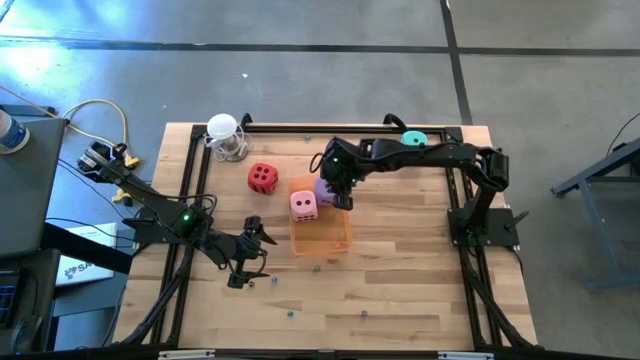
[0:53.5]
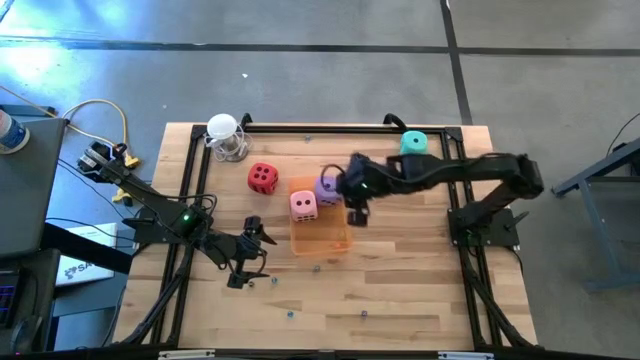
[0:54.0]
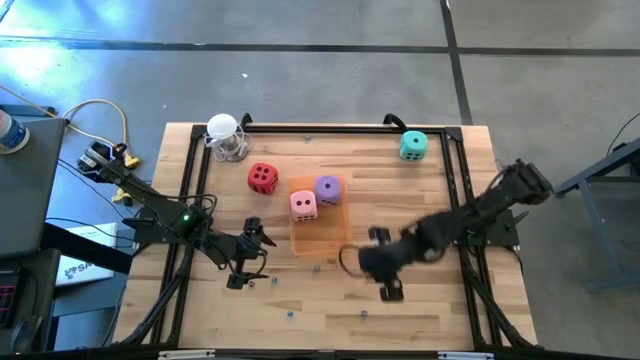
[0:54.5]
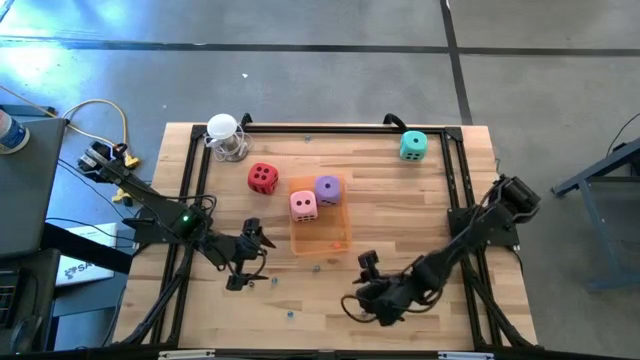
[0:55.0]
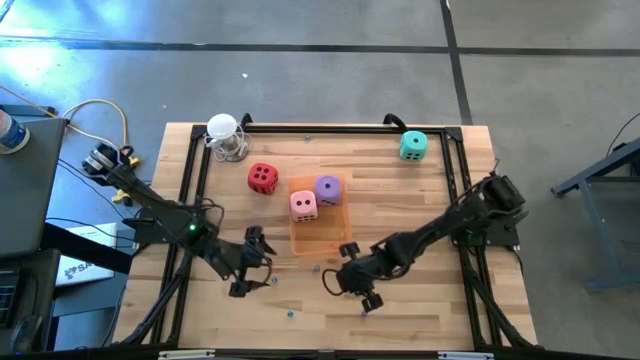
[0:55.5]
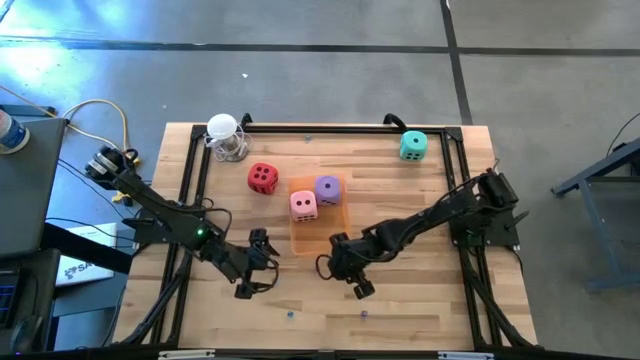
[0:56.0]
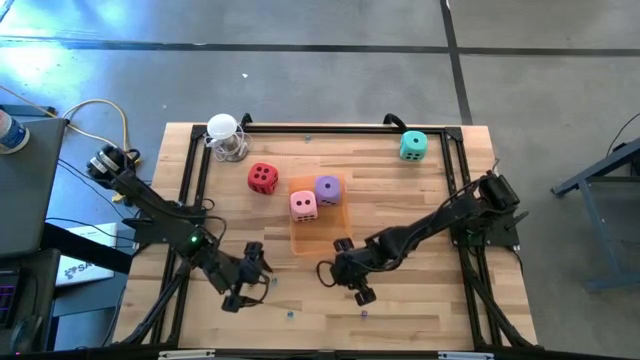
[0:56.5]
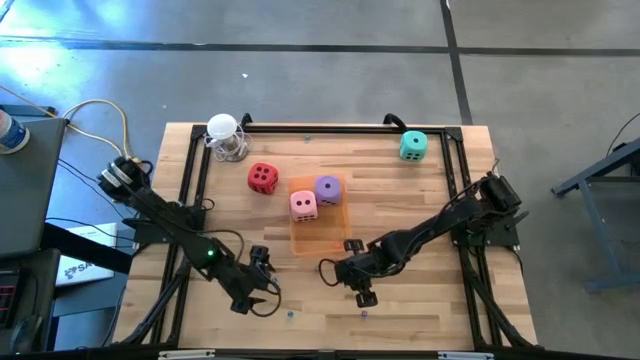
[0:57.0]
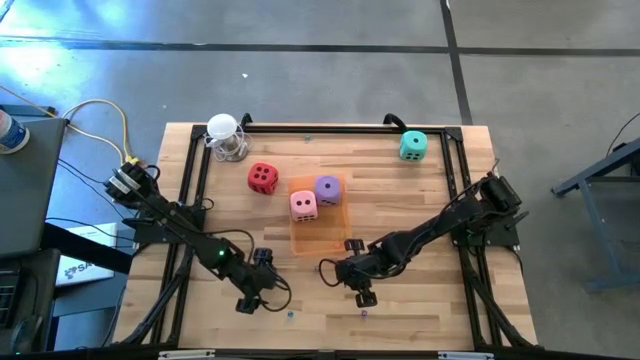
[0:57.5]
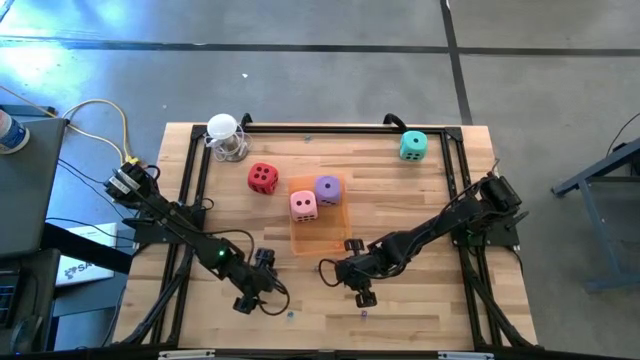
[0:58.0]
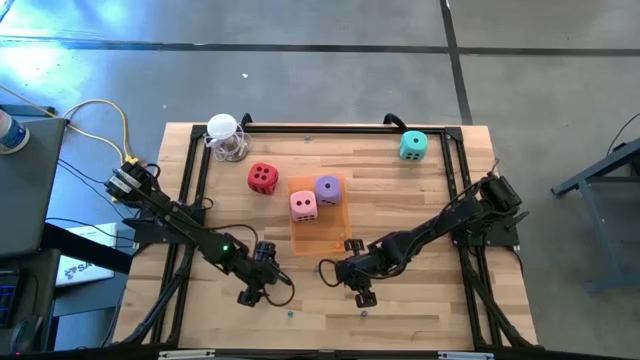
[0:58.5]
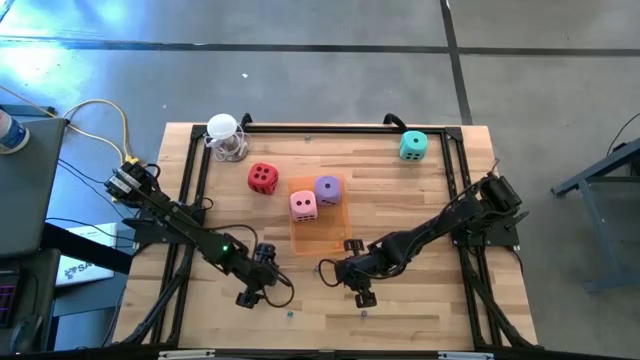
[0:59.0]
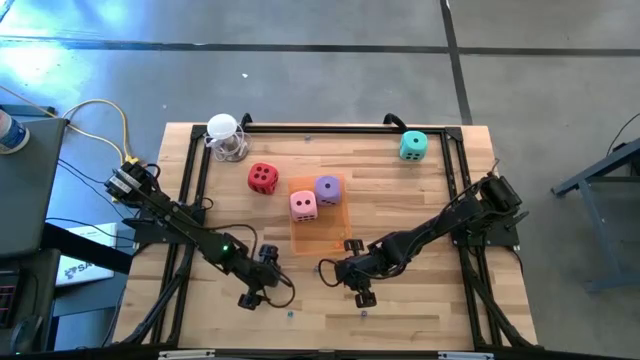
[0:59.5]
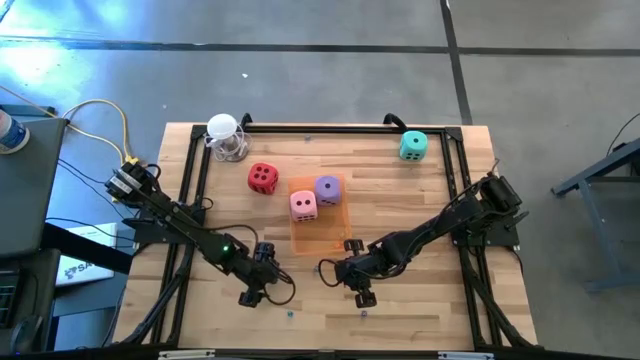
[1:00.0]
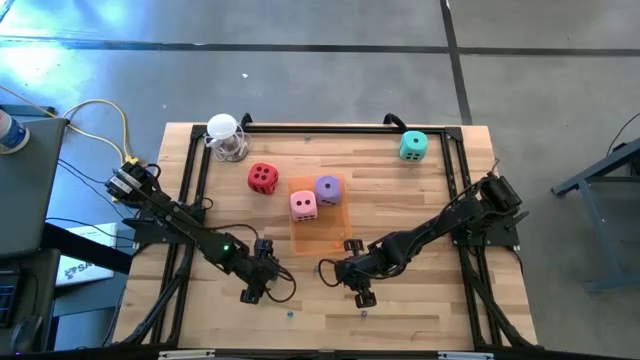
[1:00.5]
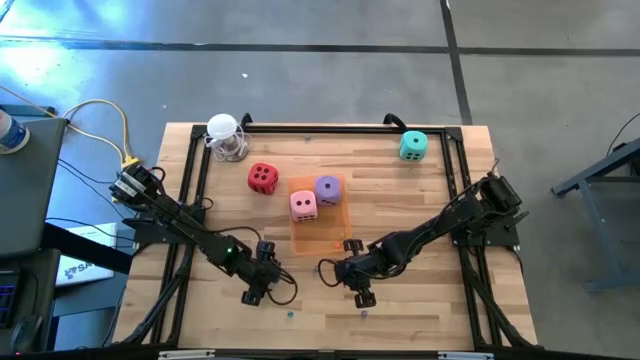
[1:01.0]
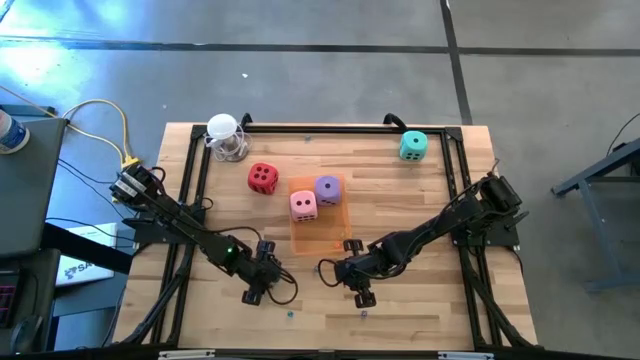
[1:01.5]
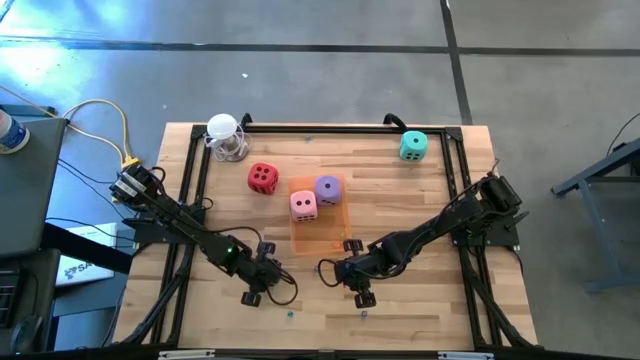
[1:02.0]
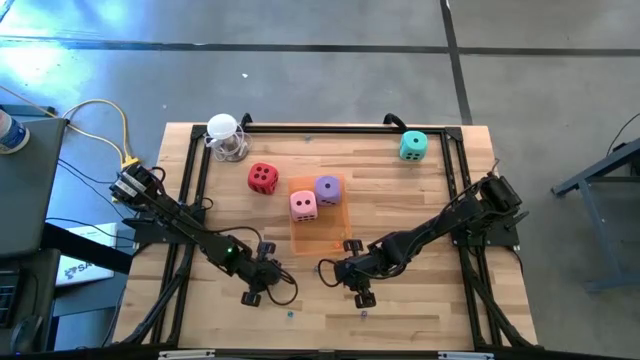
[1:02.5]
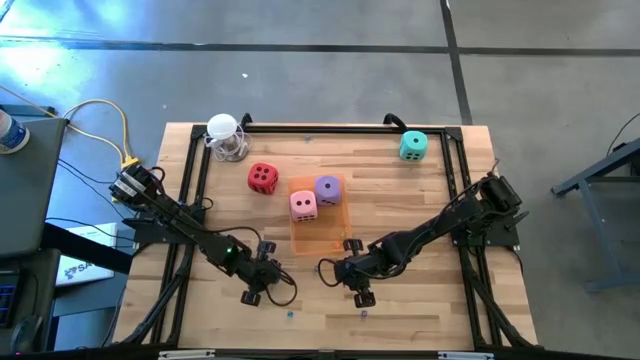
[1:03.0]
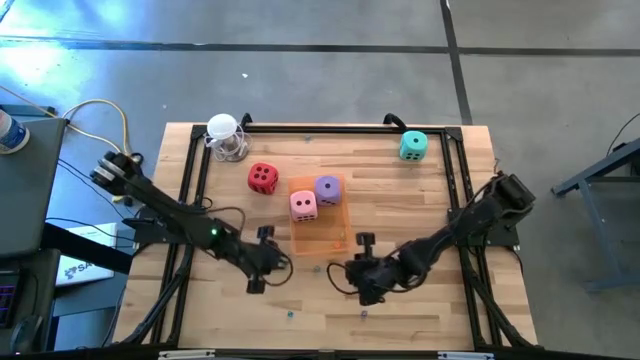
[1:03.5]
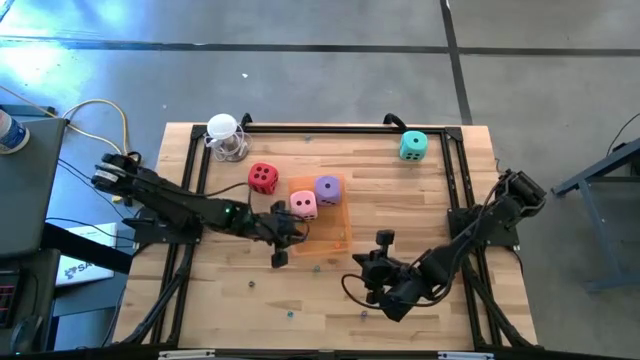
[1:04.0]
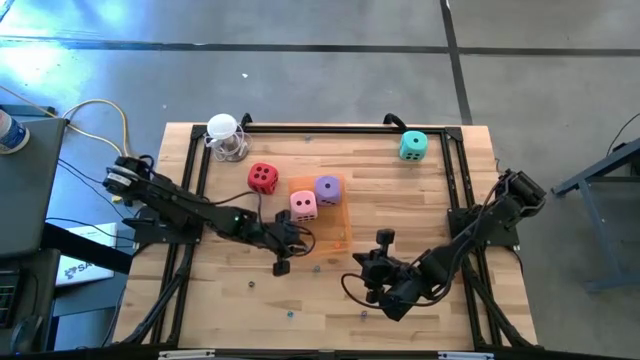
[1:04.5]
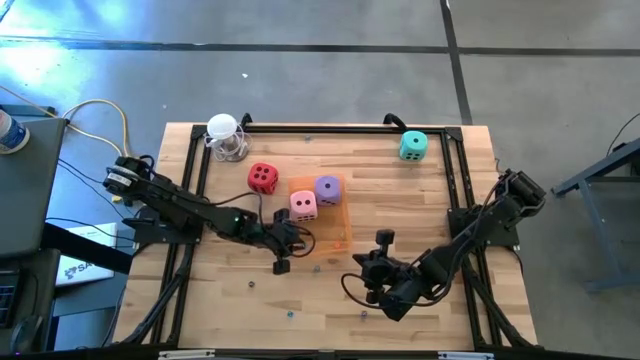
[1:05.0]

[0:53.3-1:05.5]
Task: Pick & Place Dice
Put the small light blue die into the orange bin

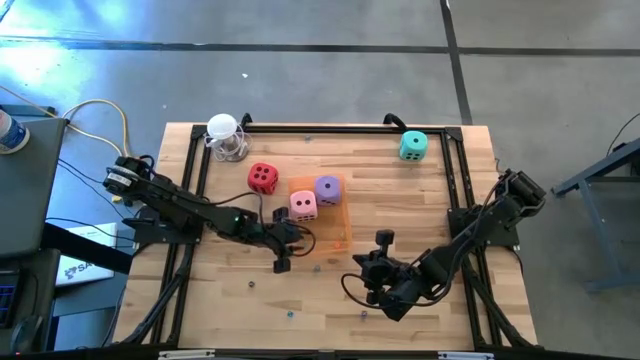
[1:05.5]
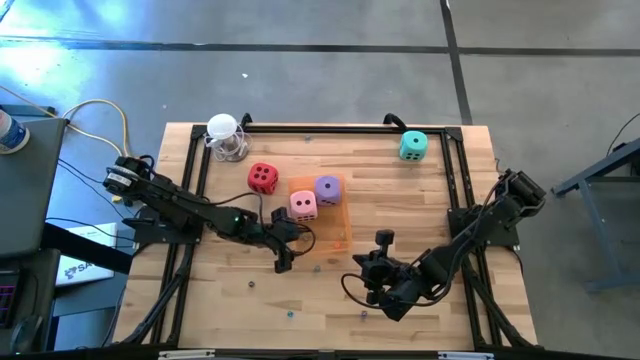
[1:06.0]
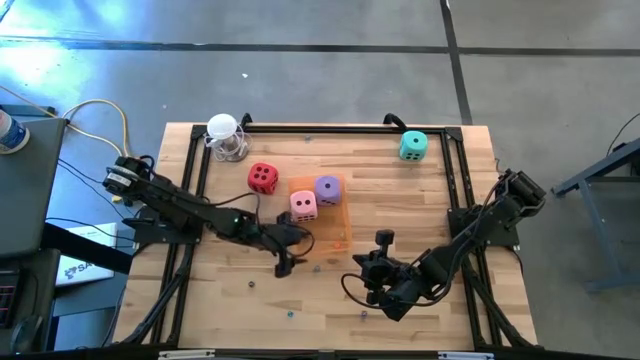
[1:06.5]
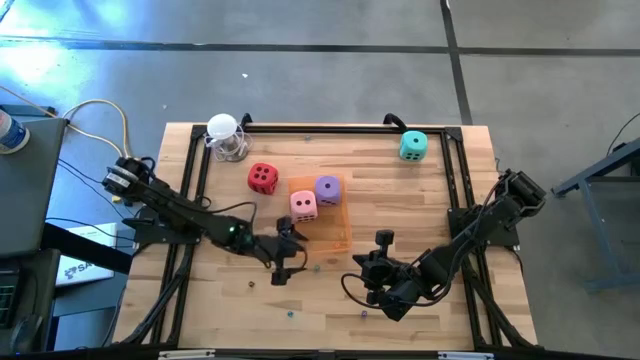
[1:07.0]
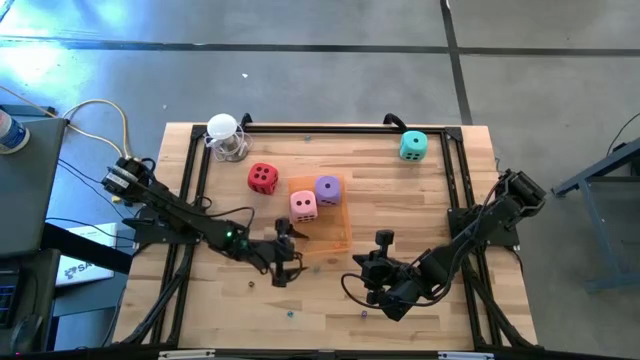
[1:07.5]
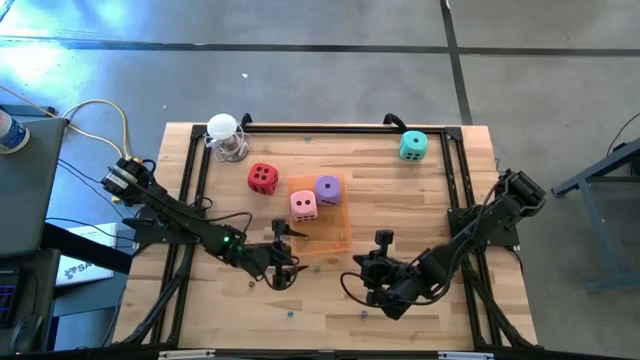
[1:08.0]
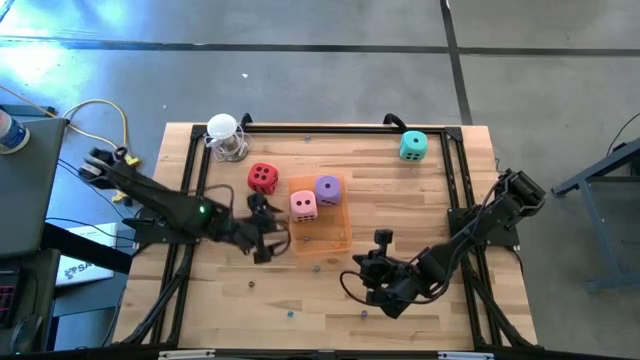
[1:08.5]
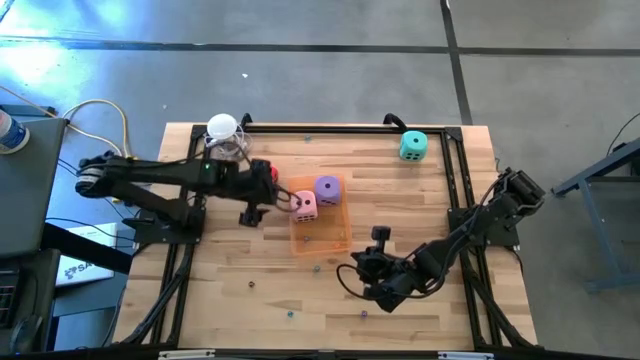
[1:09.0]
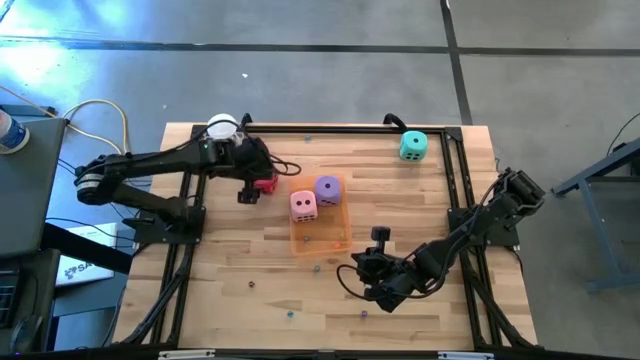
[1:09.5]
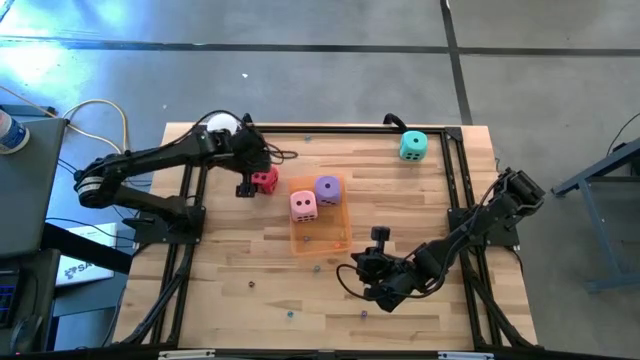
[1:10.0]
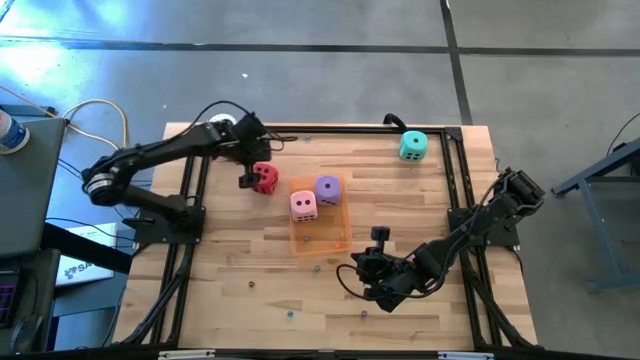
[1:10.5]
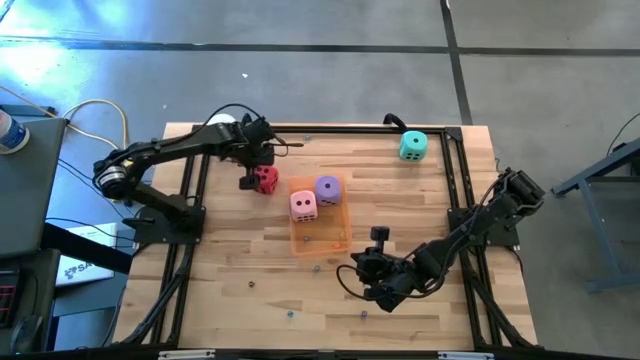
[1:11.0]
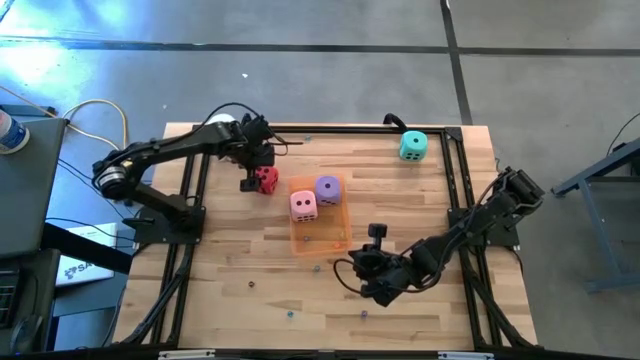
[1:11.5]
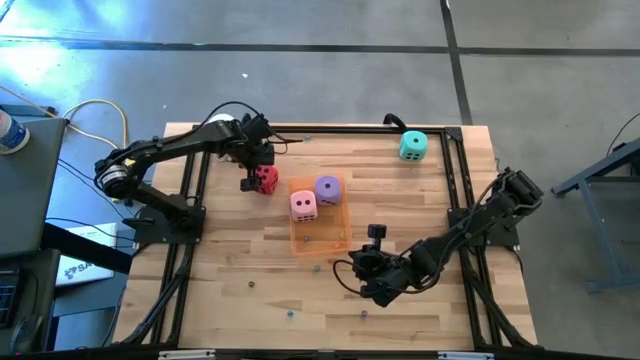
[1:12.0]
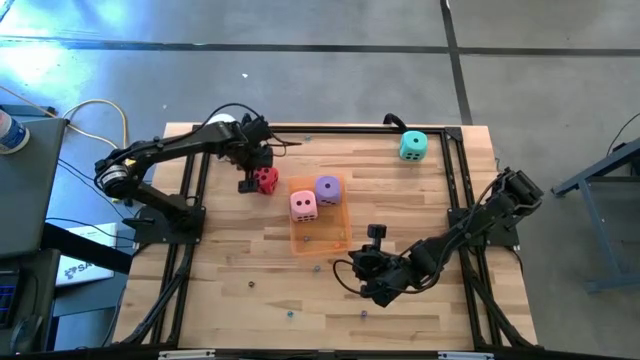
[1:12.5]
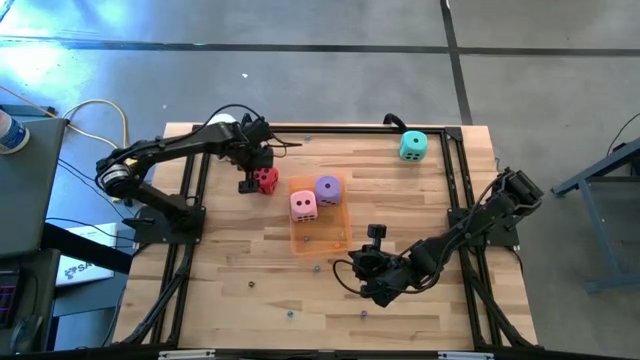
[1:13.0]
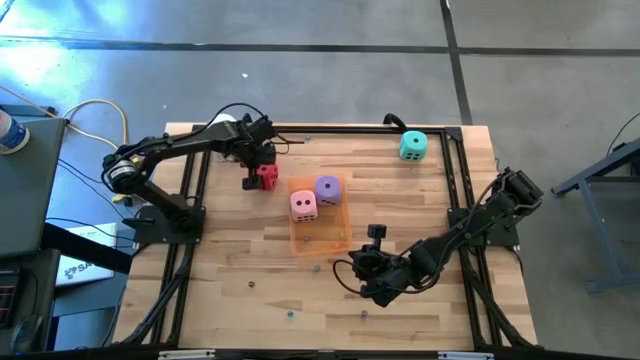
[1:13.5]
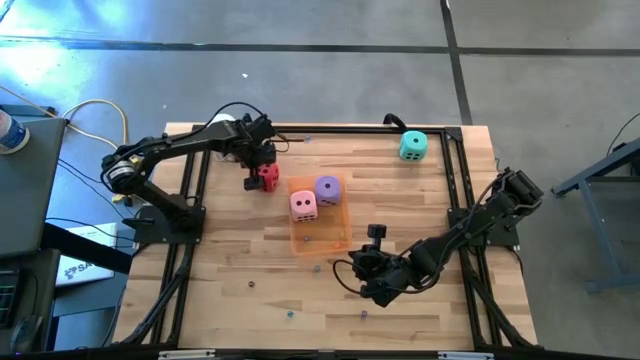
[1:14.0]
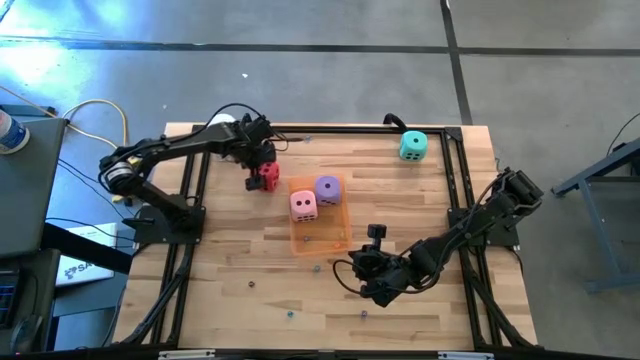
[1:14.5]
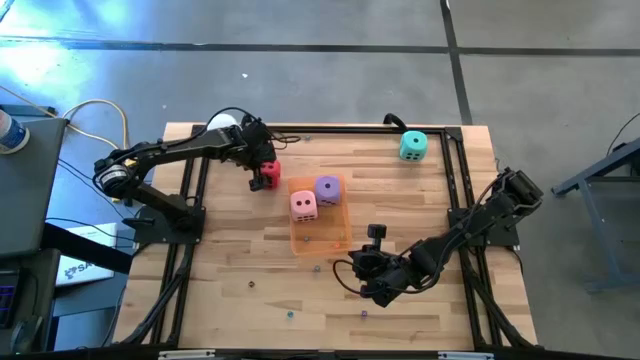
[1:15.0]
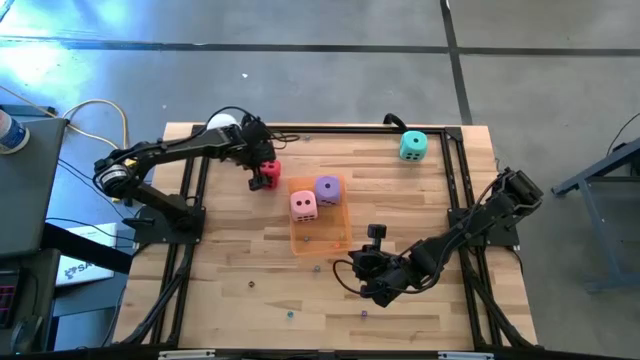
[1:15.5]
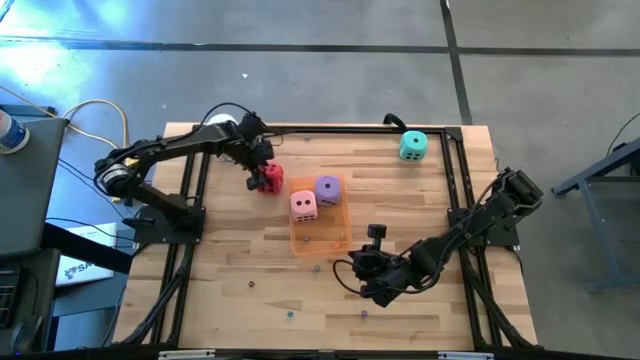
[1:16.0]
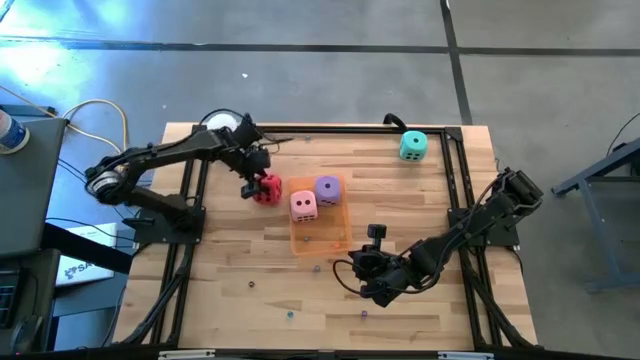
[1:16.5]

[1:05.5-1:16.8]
Put the large red die into the orange bin
